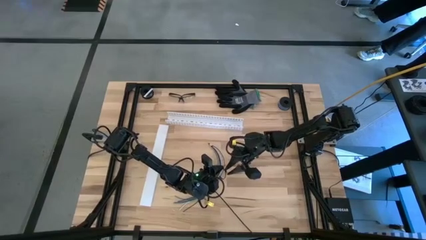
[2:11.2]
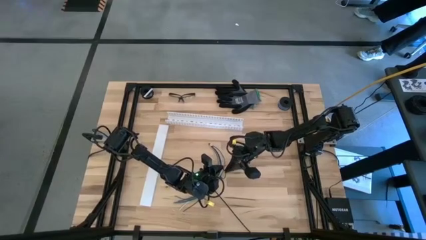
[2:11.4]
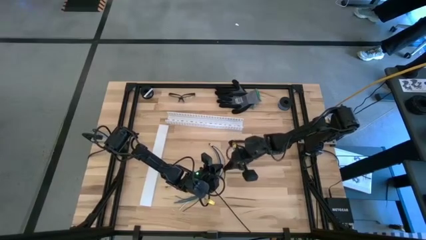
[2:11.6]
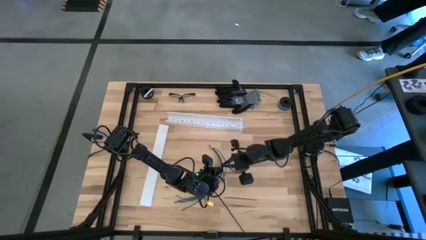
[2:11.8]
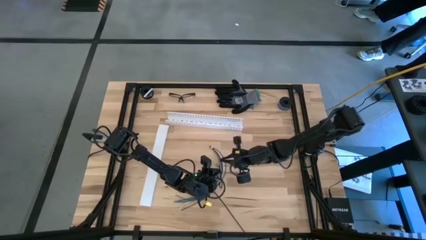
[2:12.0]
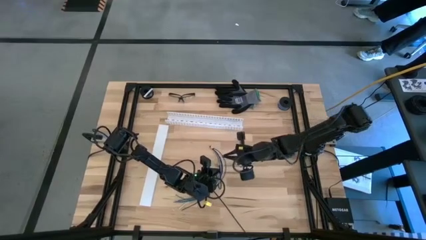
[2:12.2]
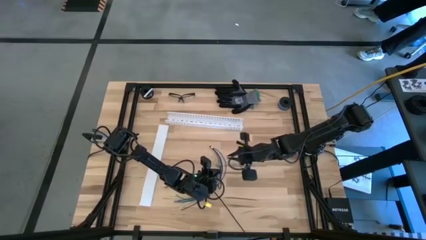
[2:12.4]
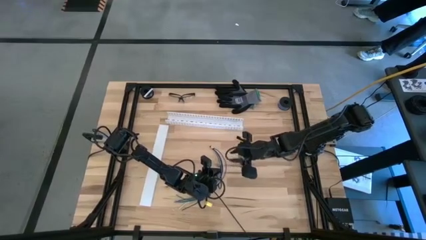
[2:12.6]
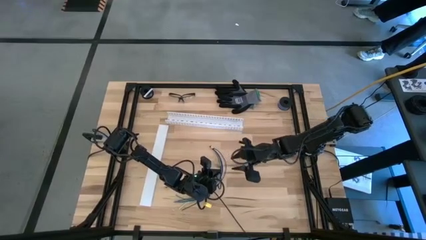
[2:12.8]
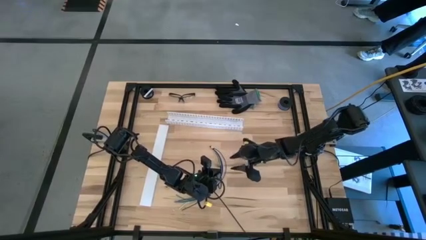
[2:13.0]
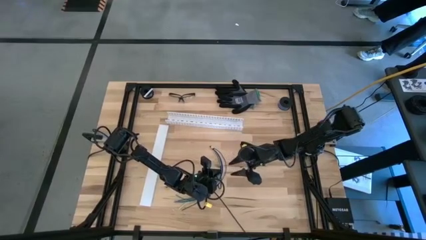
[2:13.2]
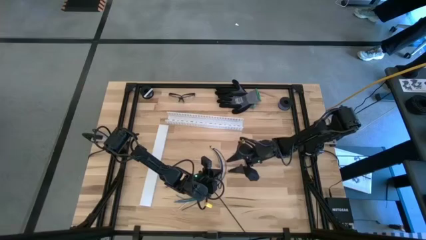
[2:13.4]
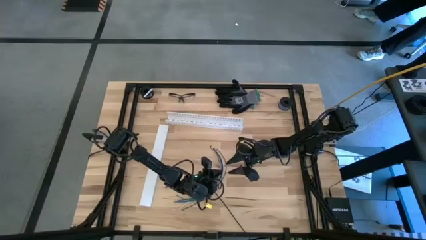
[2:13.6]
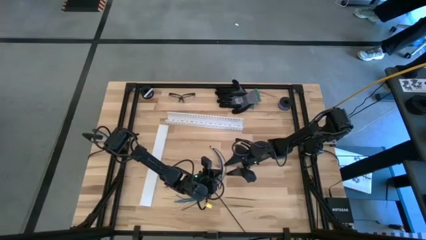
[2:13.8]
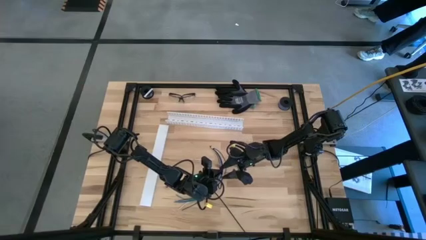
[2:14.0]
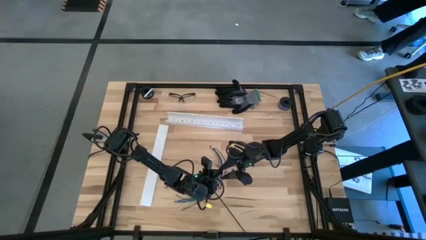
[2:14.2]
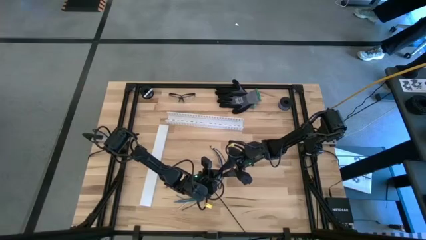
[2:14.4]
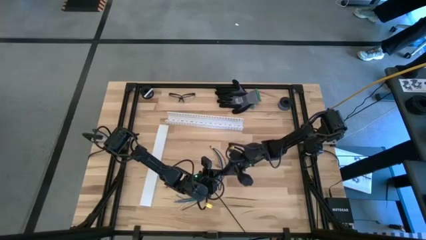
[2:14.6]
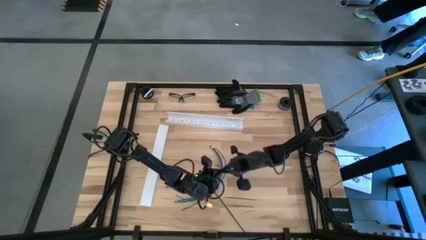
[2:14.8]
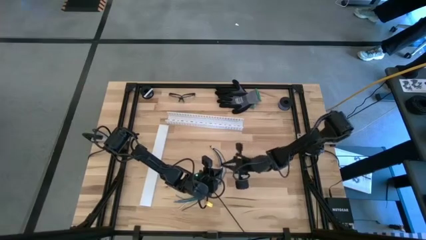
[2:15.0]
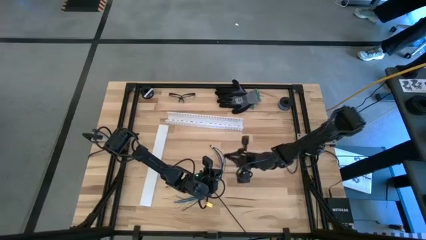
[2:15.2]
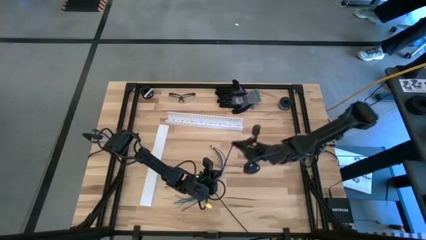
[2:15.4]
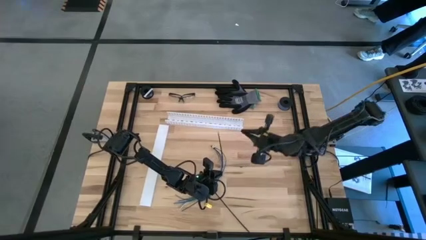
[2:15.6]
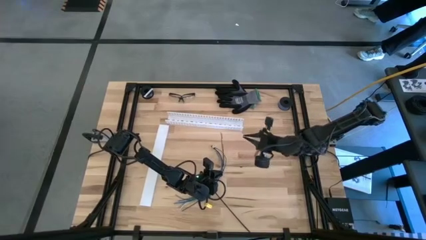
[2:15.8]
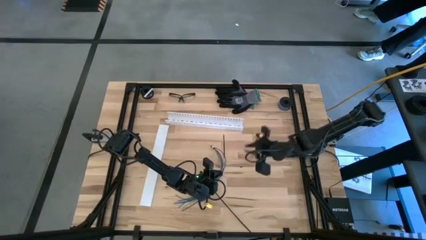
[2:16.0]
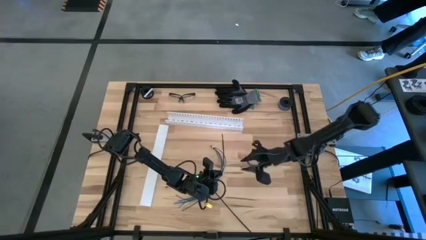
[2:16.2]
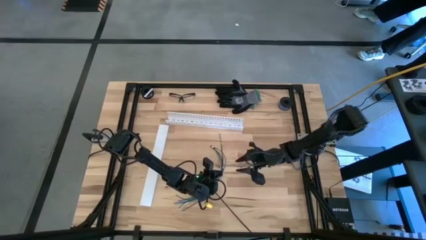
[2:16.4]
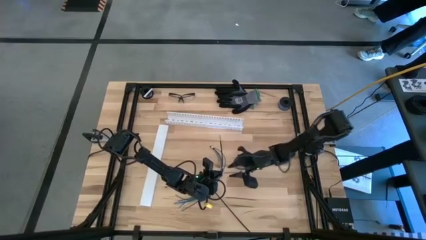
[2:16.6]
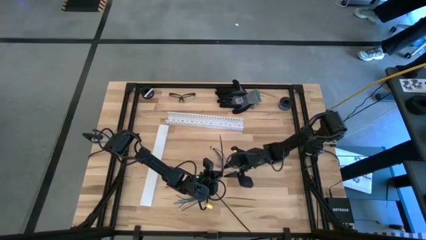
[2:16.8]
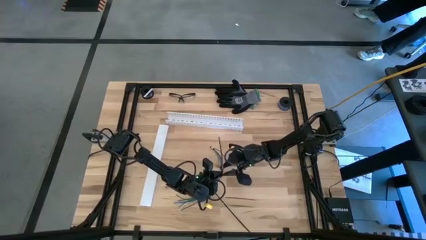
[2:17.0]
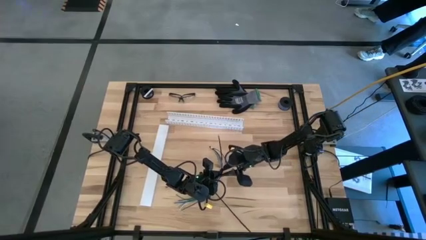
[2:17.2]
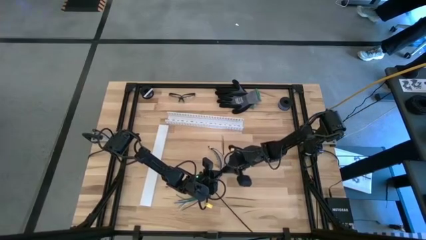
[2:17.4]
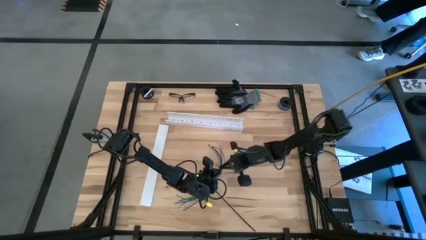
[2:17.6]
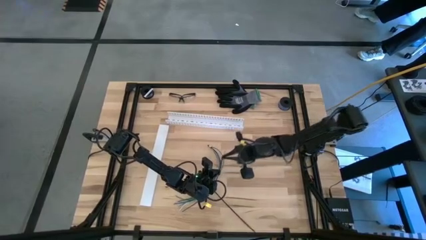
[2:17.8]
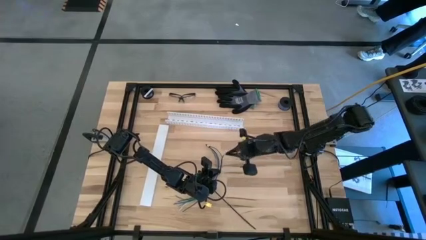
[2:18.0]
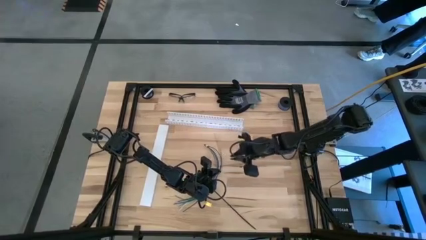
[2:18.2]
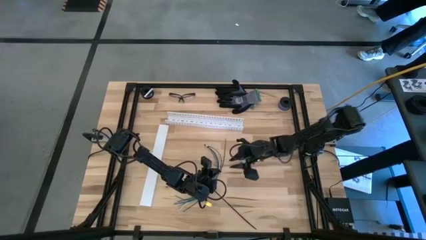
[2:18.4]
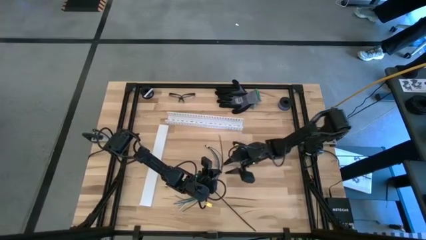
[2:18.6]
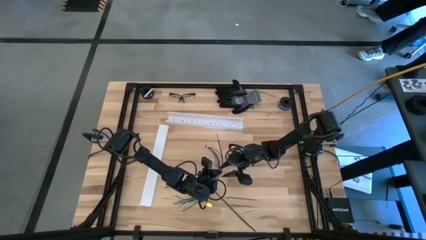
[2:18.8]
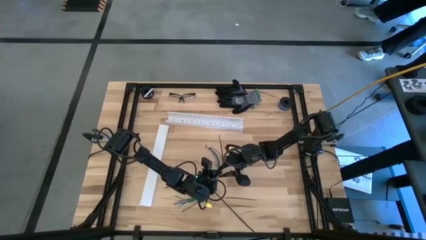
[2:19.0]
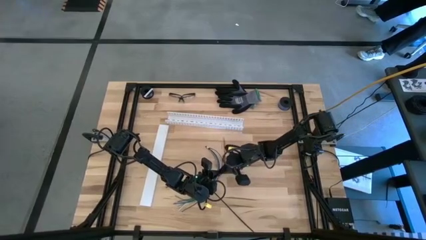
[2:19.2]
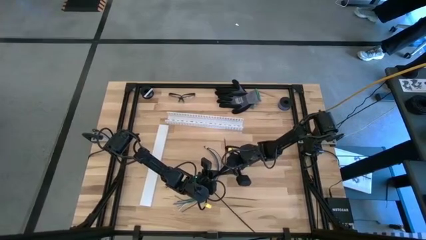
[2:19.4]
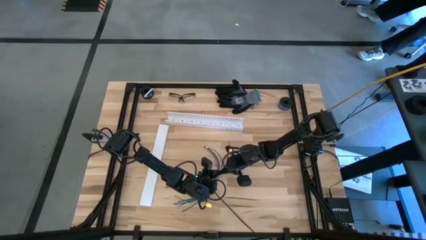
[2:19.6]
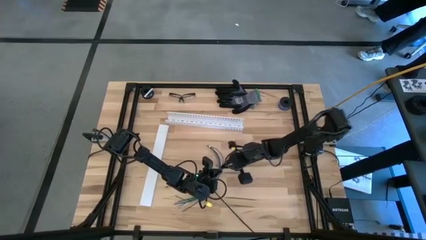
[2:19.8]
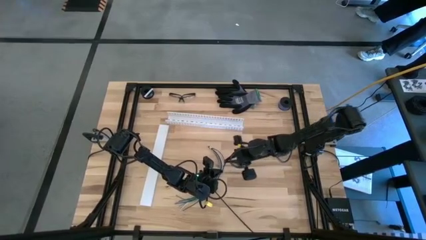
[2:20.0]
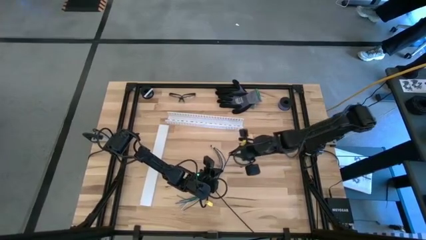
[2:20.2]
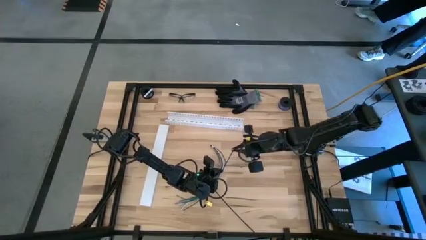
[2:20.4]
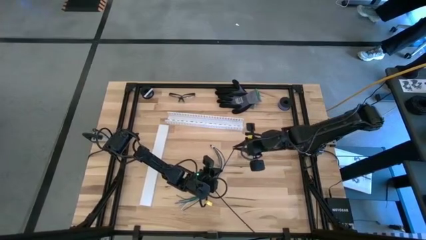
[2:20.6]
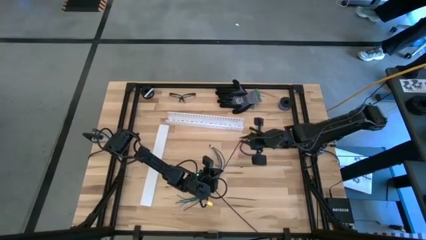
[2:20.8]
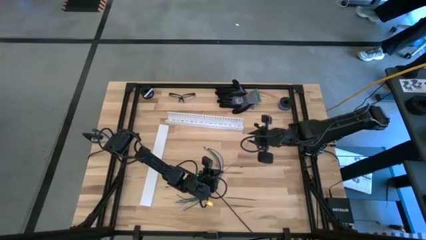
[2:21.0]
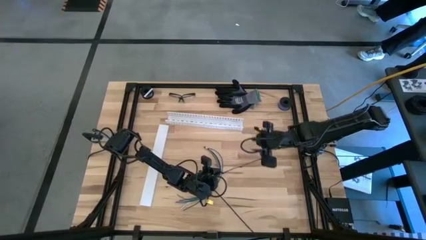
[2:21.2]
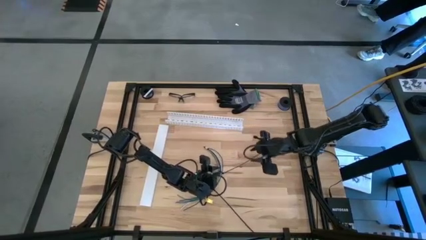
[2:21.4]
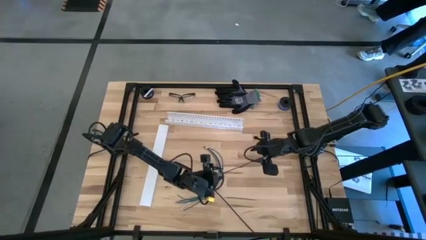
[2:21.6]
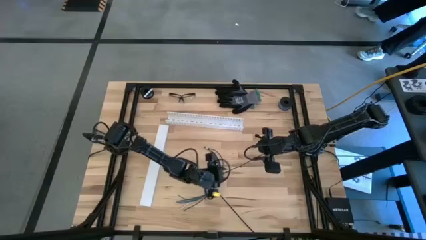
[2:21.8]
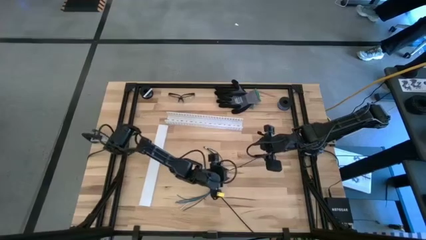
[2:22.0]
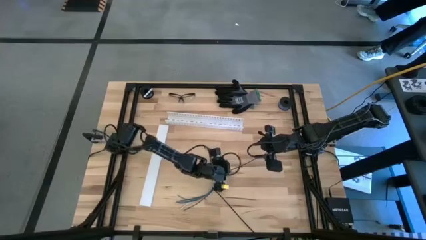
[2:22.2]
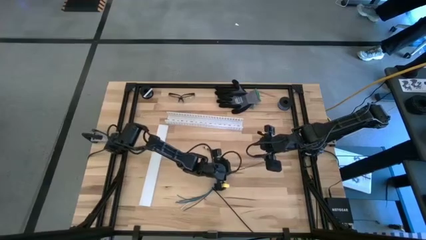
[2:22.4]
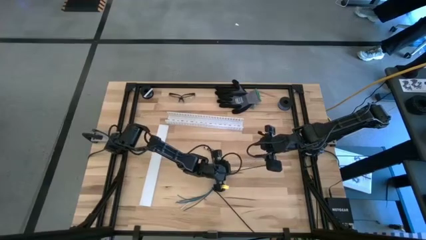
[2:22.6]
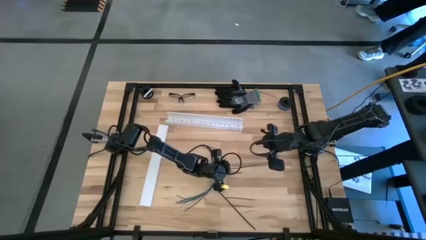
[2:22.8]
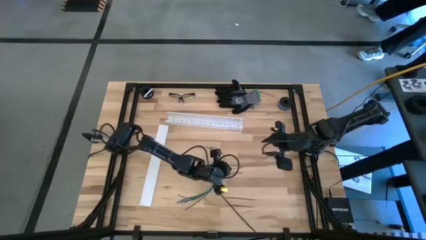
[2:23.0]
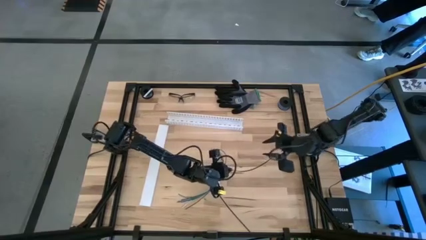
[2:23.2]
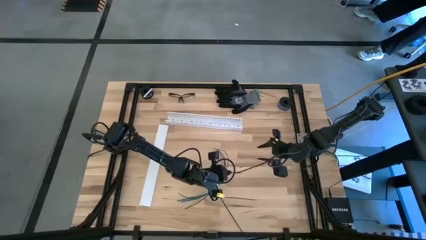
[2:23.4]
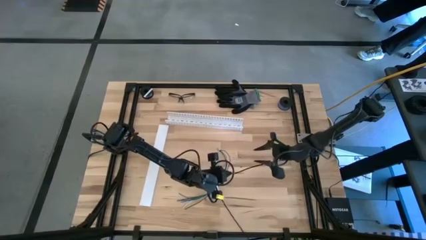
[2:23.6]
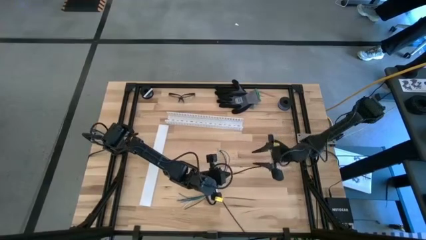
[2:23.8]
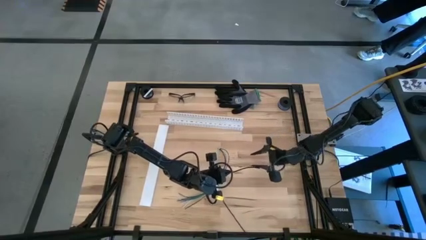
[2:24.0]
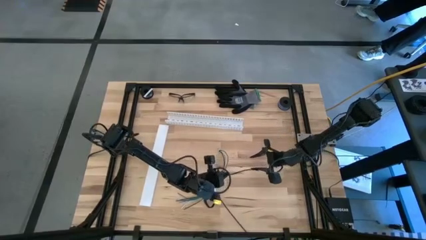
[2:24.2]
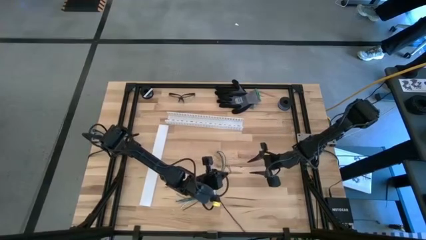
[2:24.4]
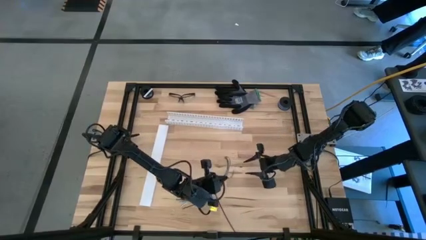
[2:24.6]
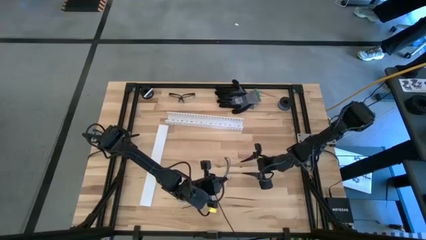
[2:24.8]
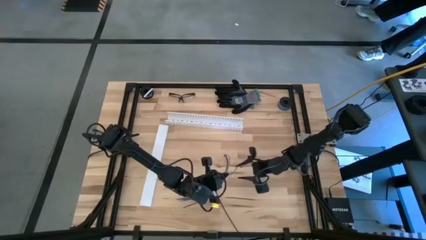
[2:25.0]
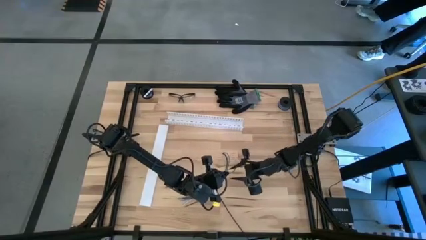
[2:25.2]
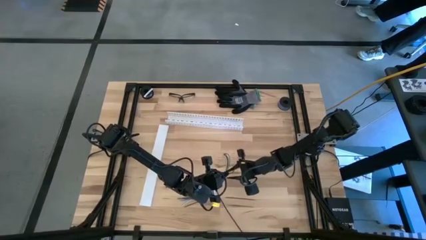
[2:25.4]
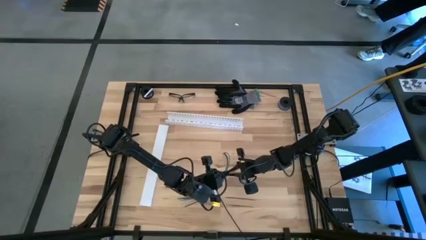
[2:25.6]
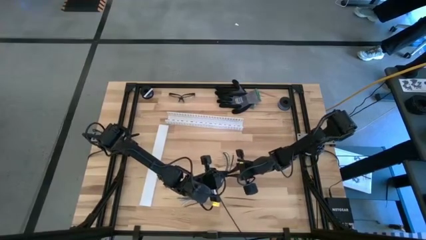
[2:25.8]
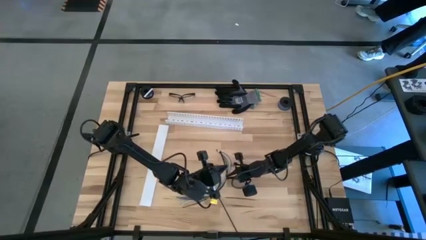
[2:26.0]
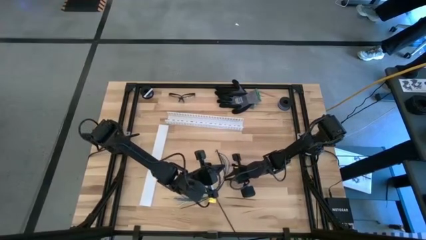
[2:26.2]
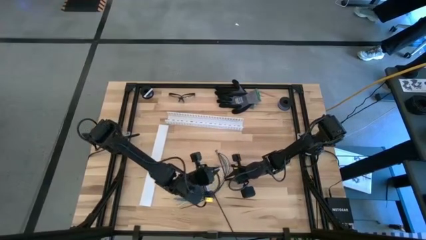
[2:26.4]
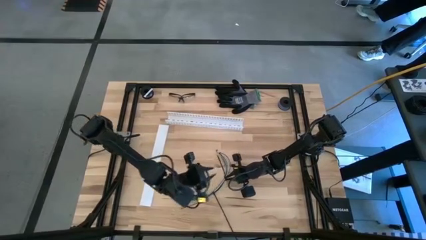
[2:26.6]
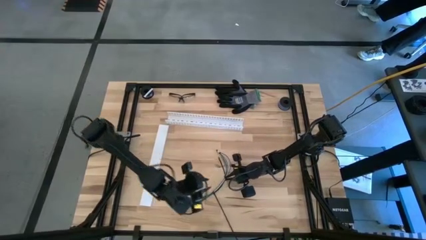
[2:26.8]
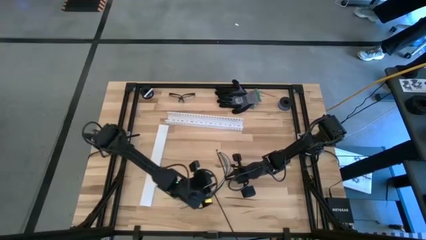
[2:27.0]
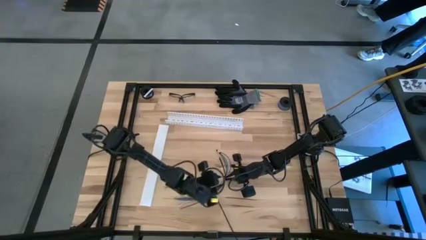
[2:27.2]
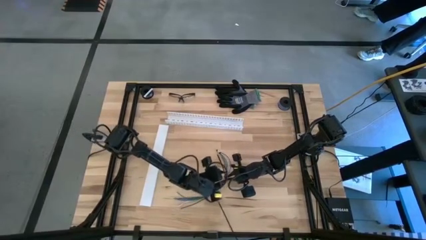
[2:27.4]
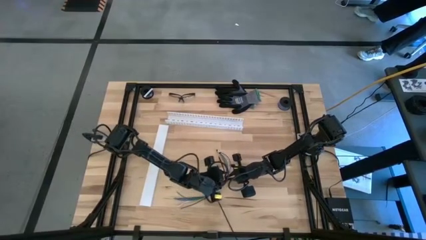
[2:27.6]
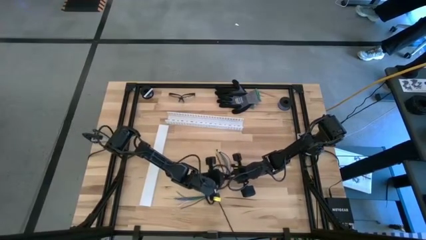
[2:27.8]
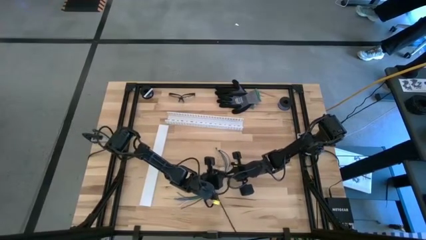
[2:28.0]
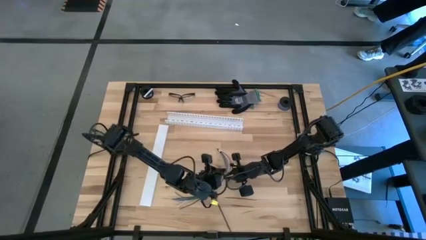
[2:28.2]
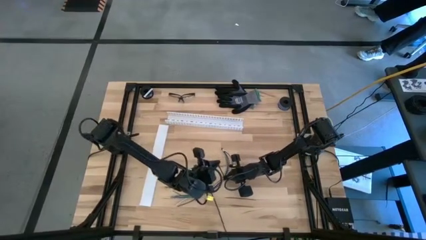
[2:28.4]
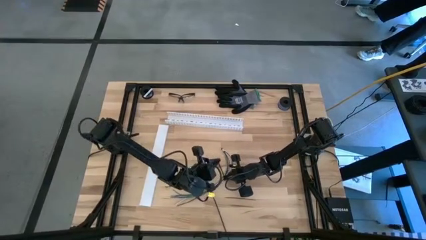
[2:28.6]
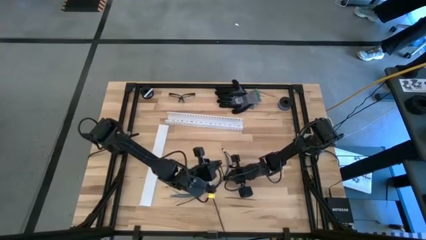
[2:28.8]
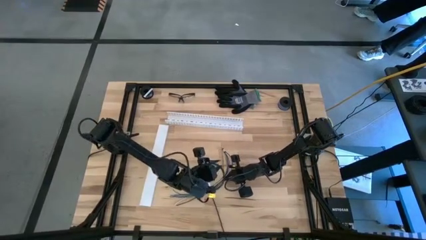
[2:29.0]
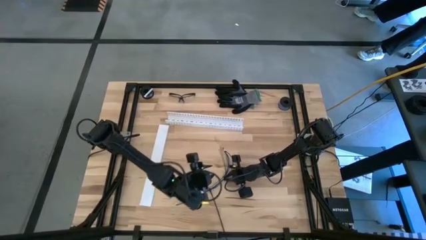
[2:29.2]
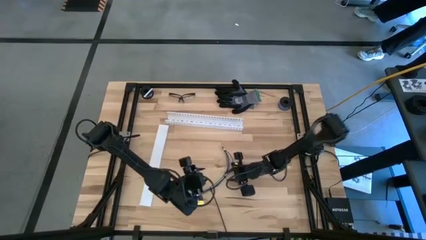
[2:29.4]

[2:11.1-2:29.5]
Task: Ziptie cables
Wrap the black zip tie on the cable
